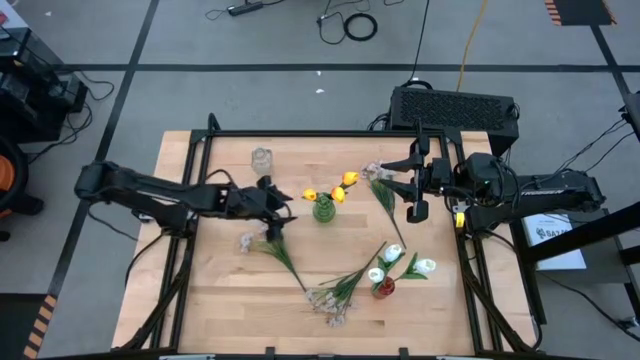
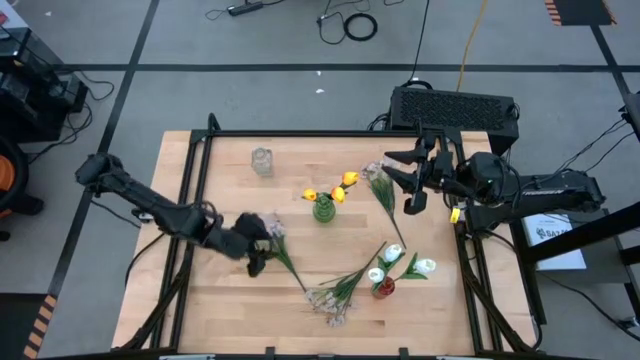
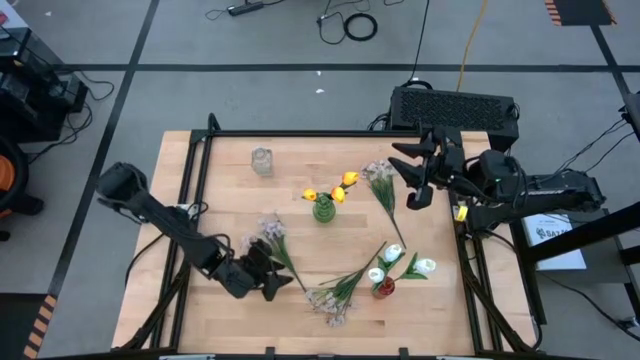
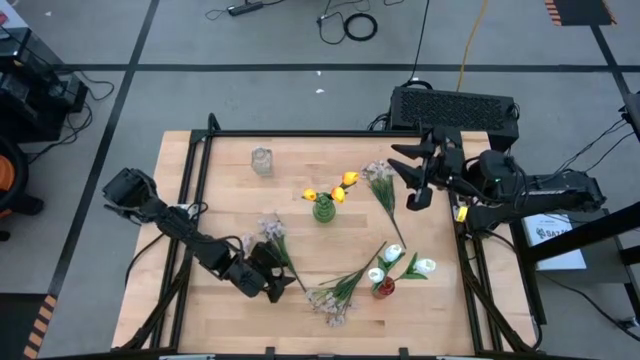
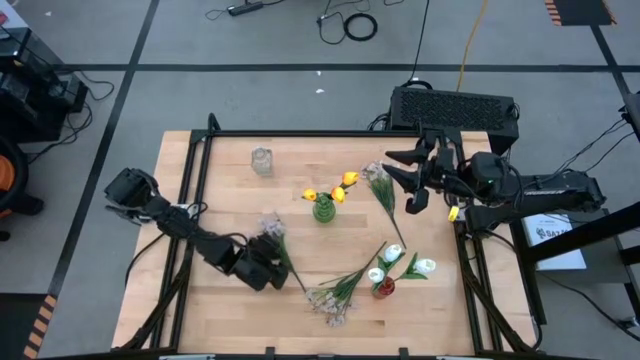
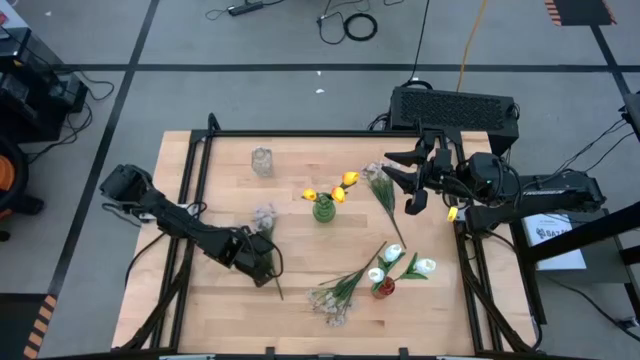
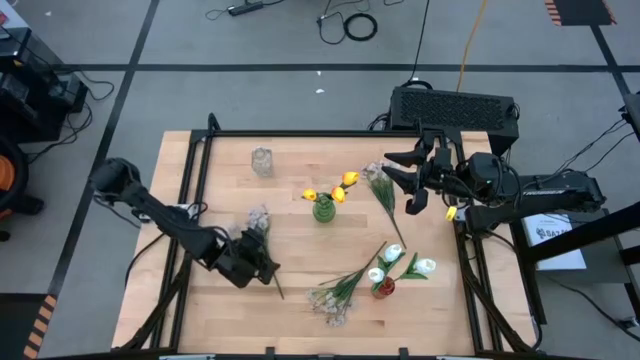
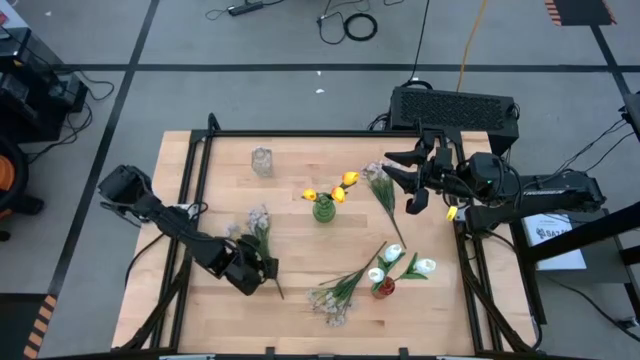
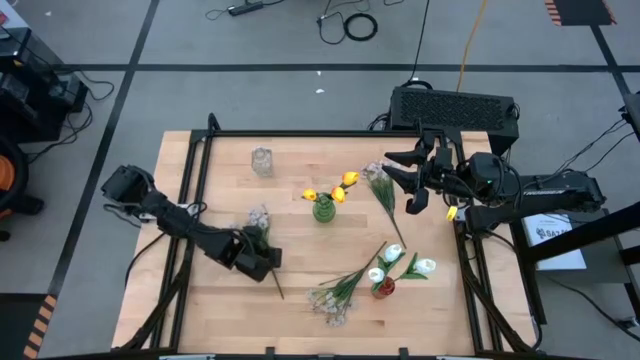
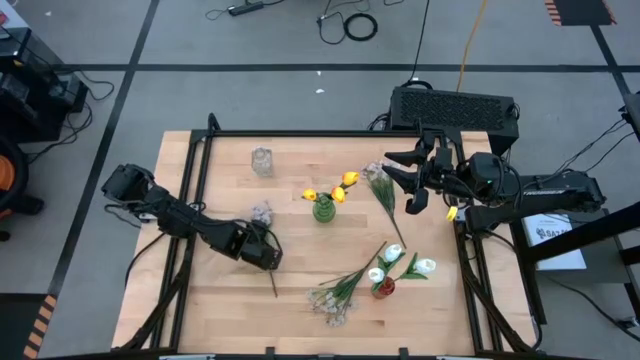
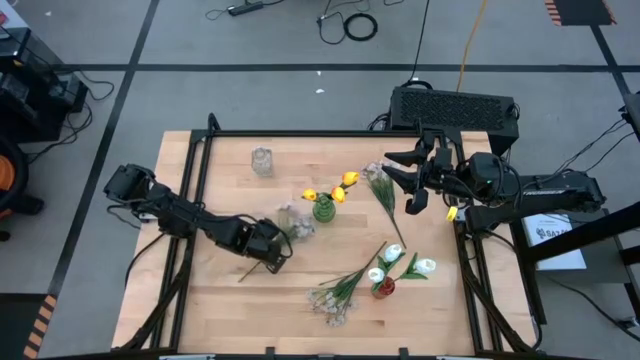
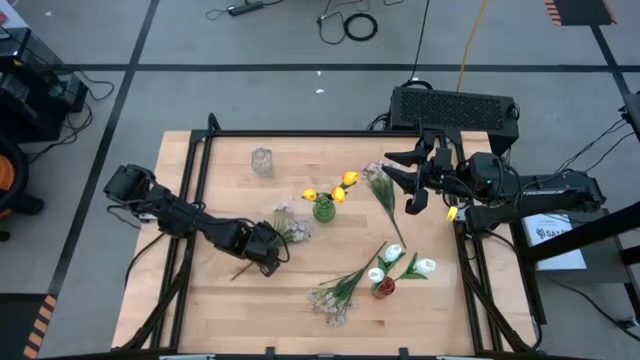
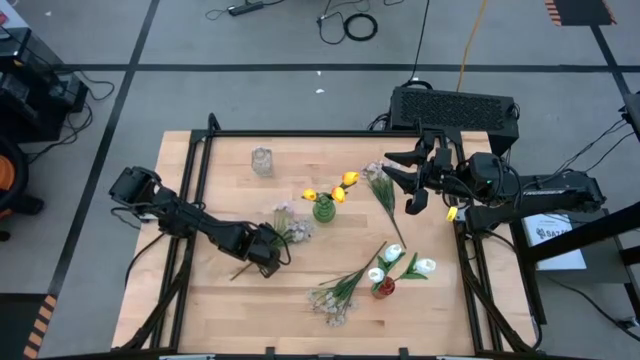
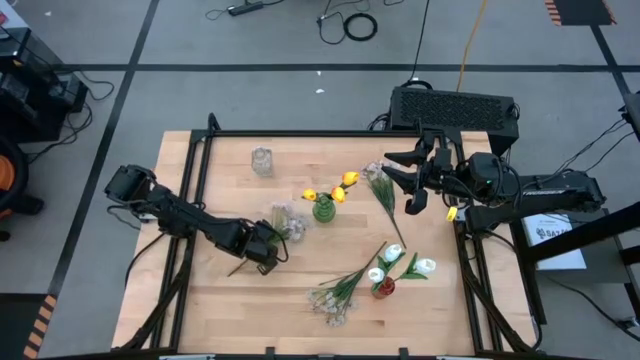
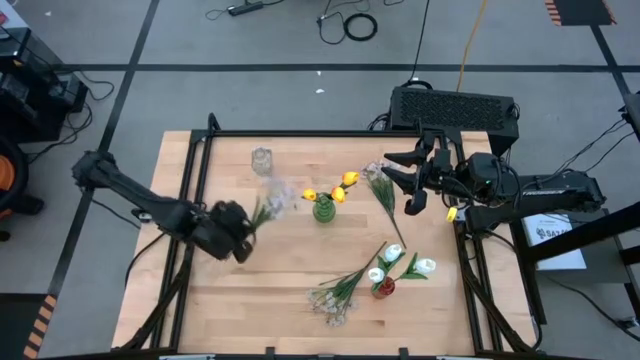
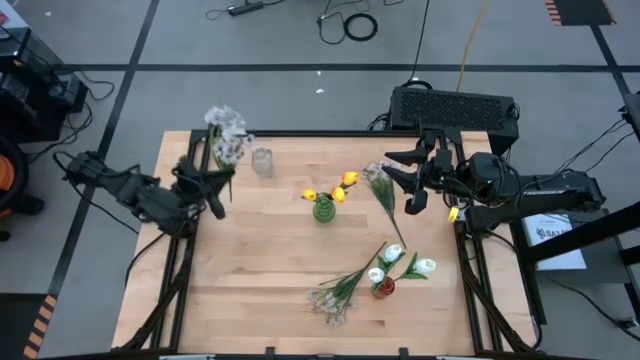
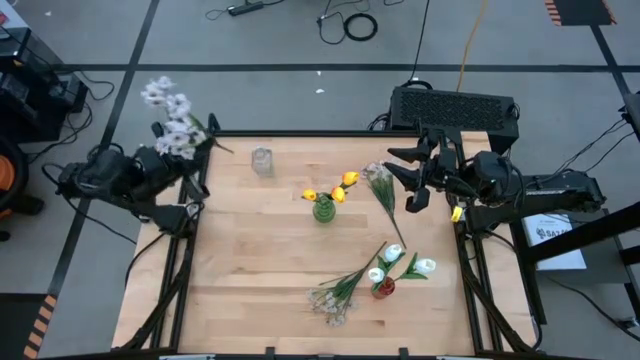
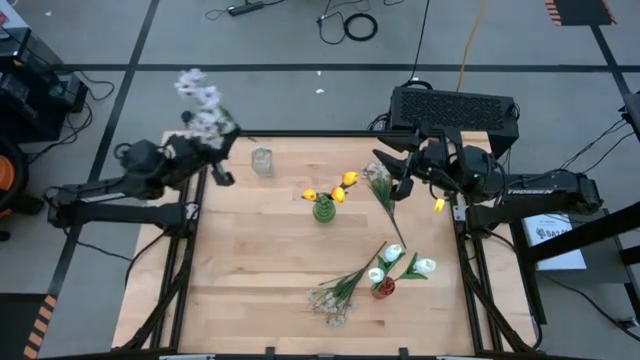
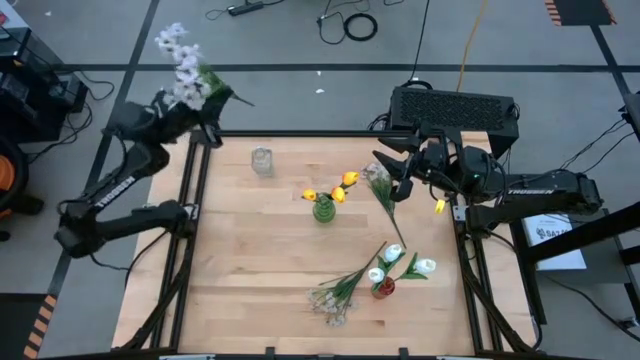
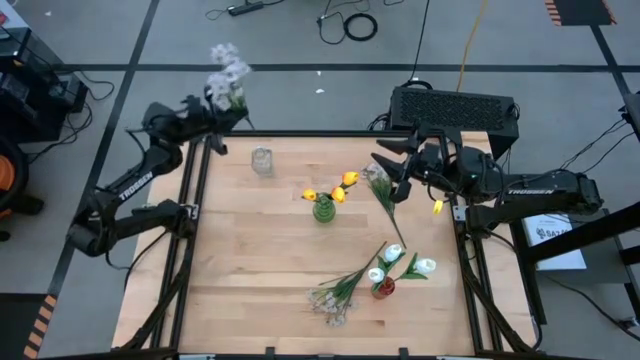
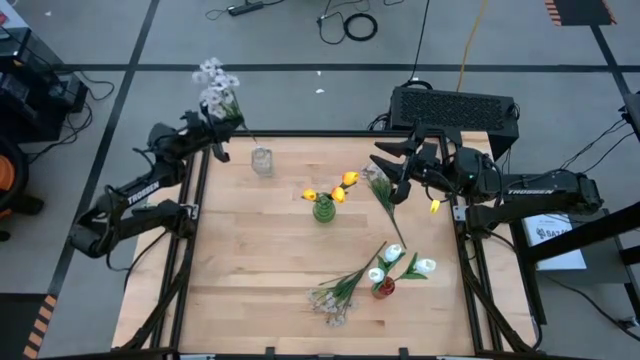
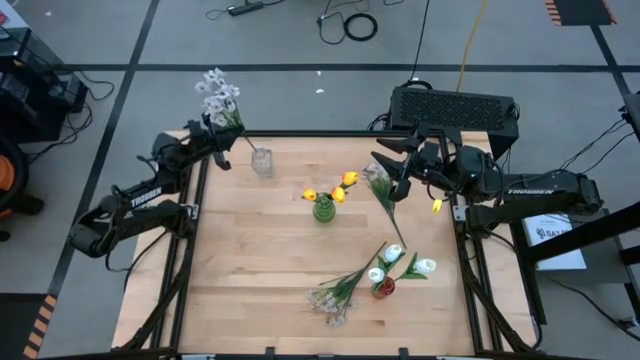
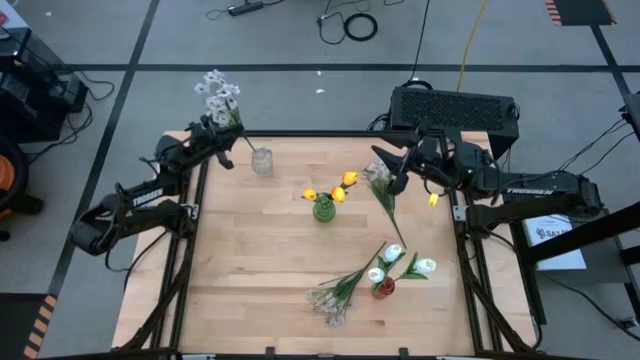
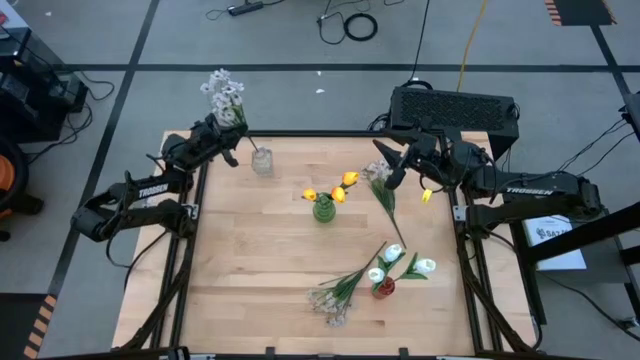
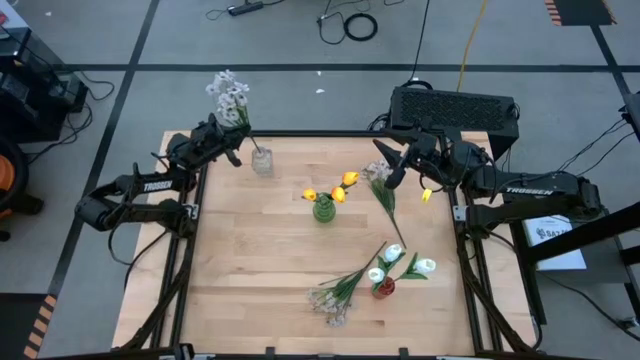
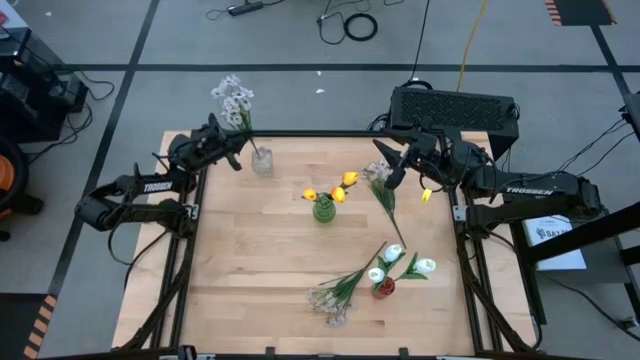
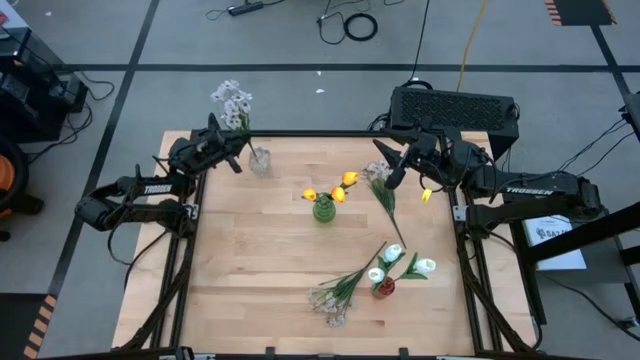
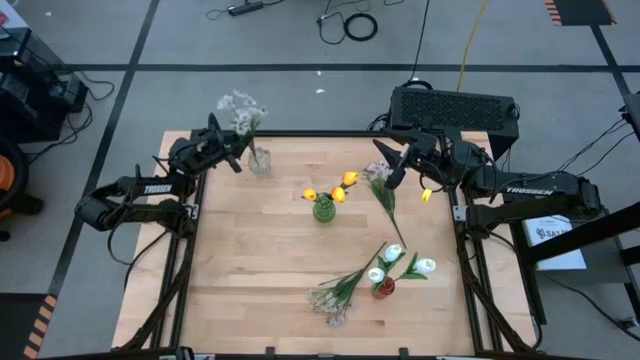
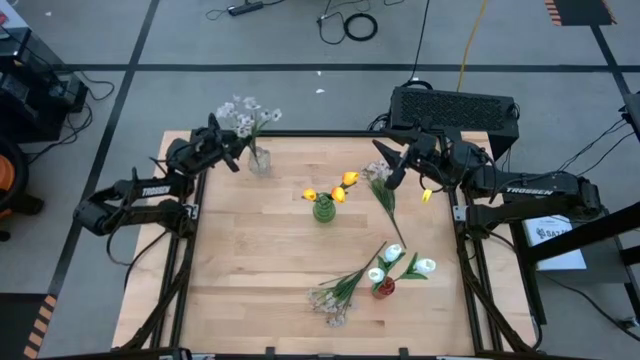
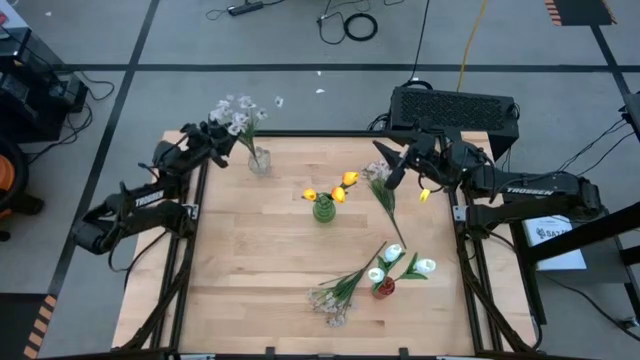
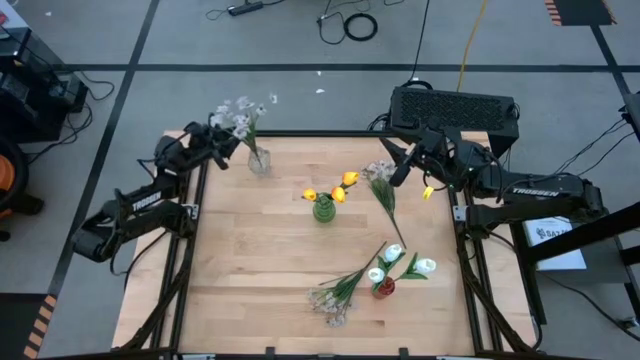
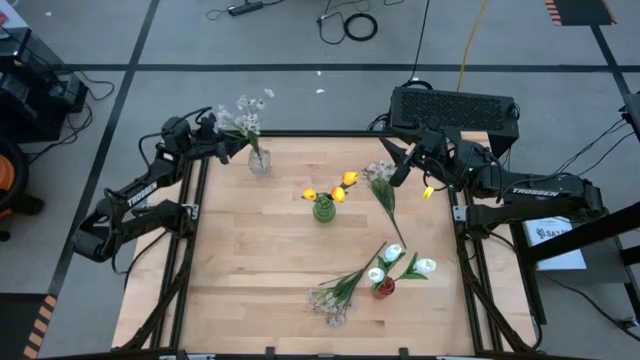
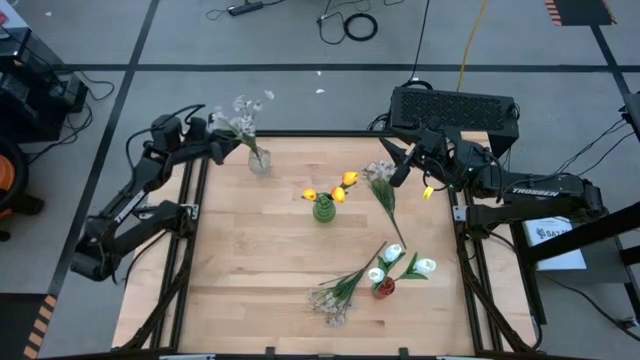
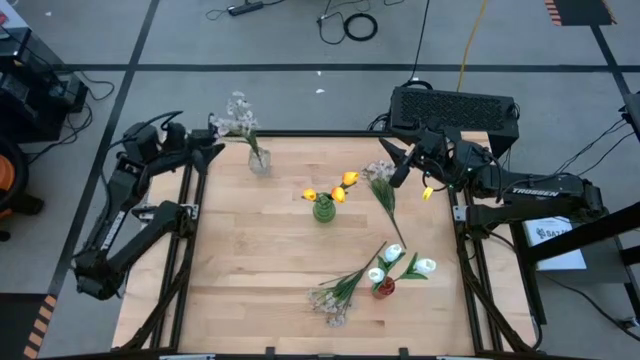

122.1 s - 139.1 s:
Task: Sort flowers into vase by color
Put the bottom left white flowers into the transparent vase

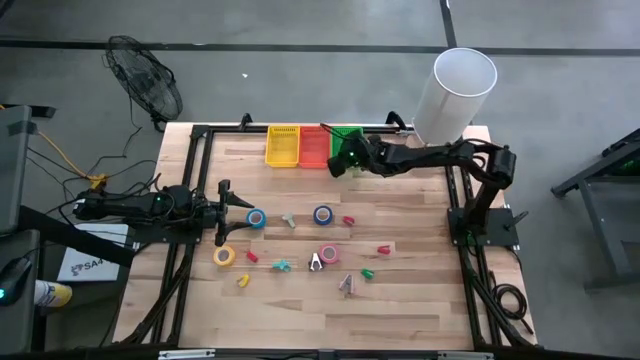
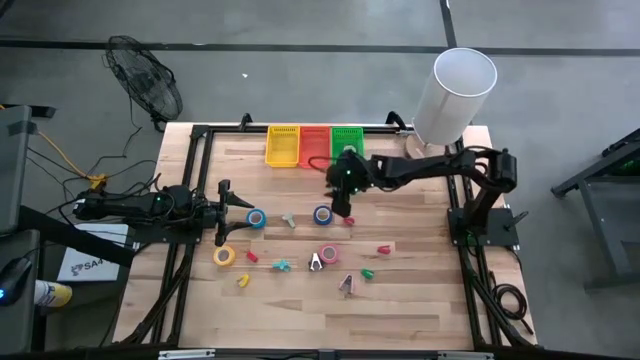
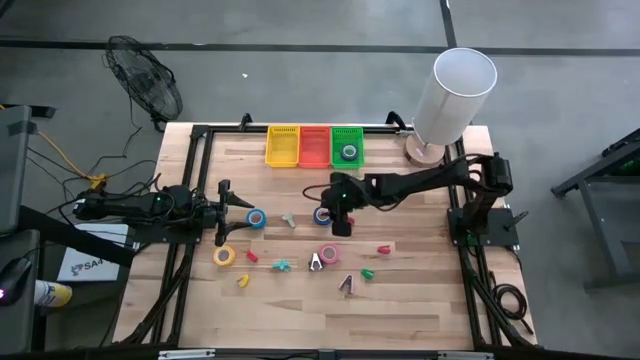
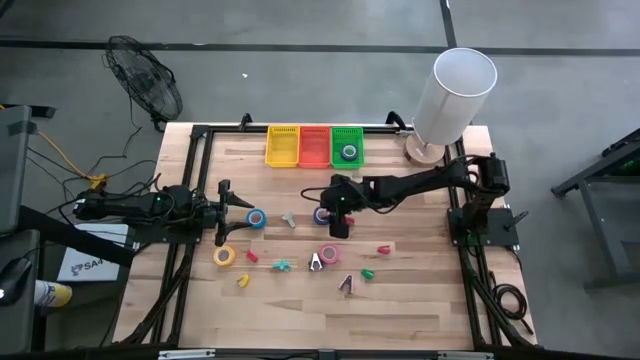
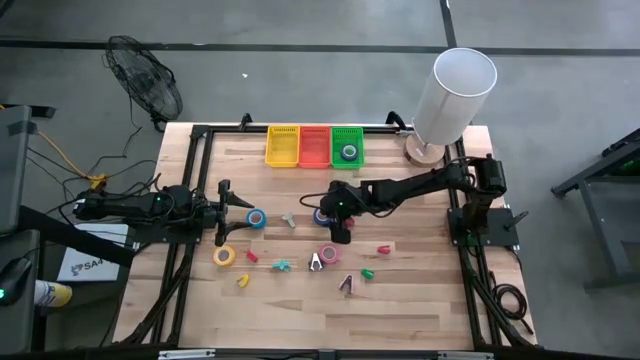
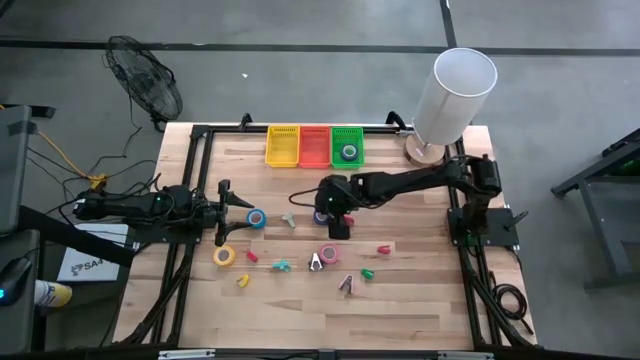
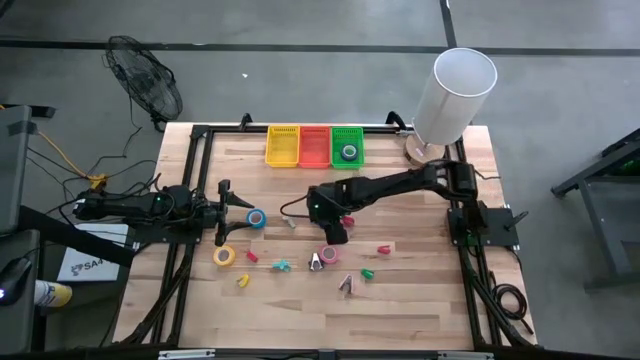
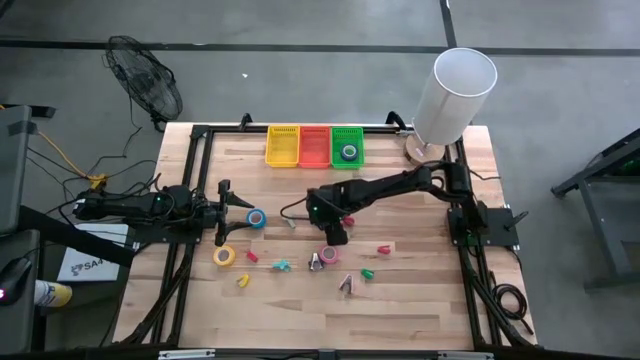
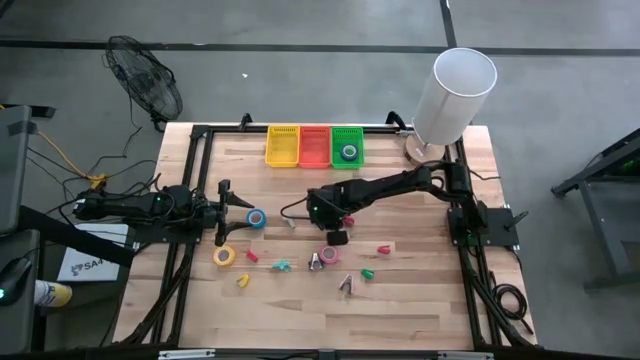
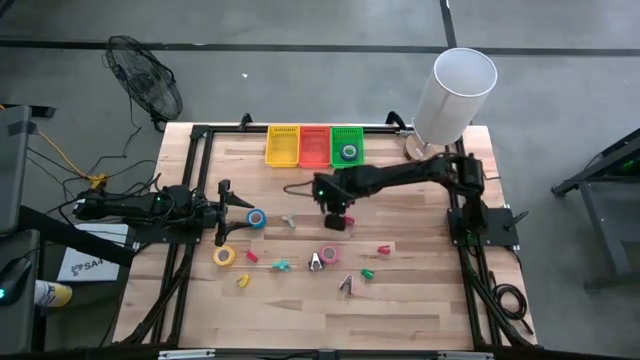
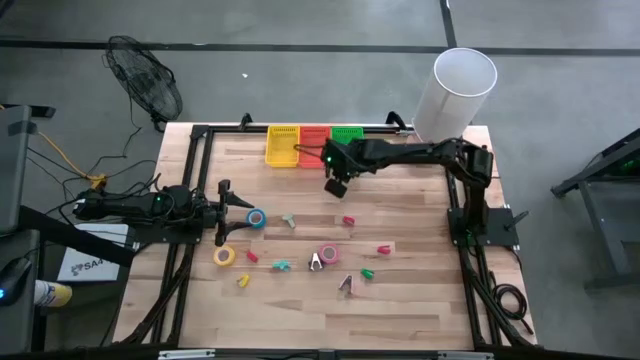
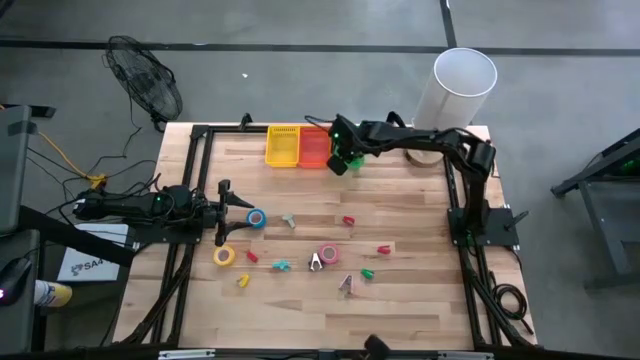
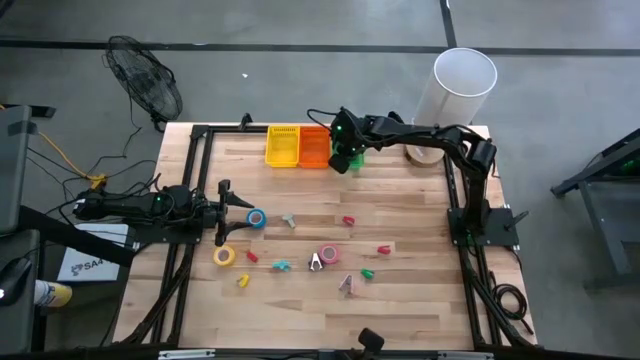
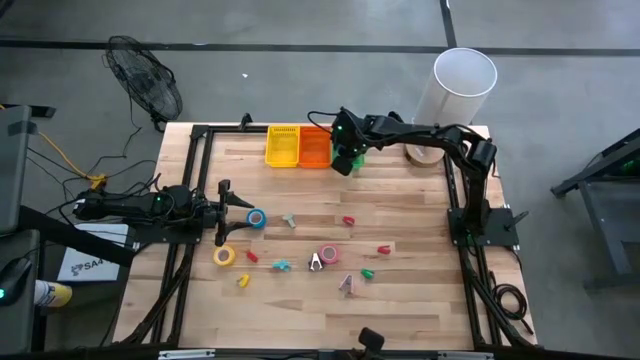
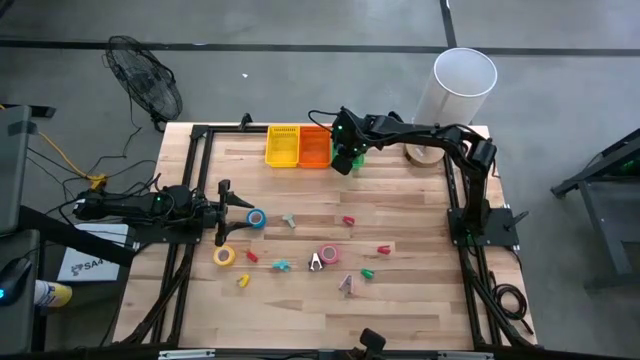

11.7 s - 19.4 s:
Task: Pick and place Stapler, Stapler remover, tape
Put the blue tape into the green basket
